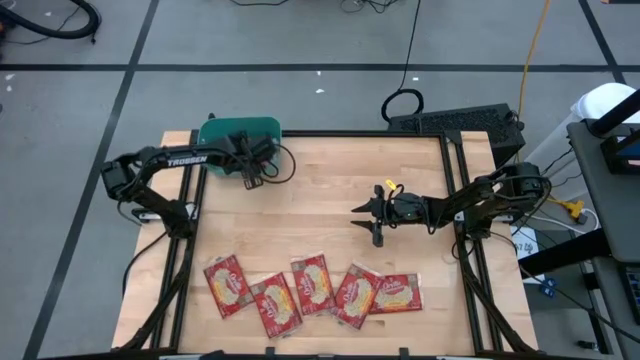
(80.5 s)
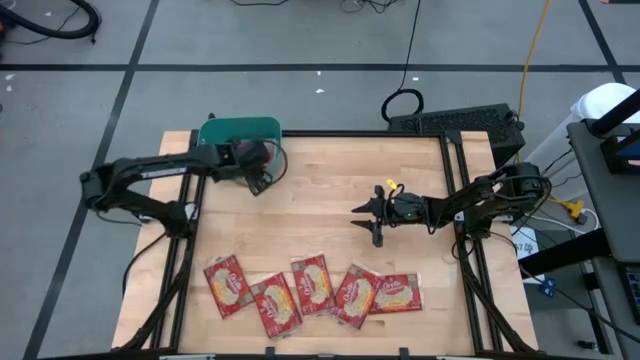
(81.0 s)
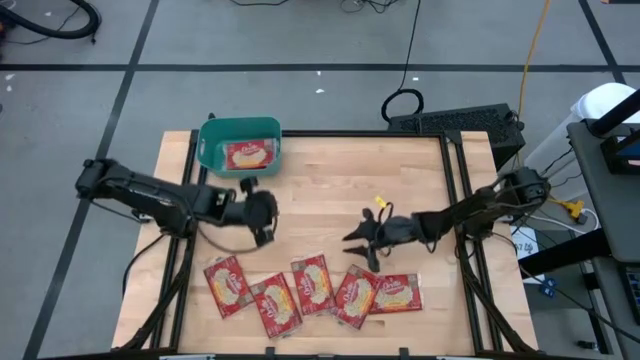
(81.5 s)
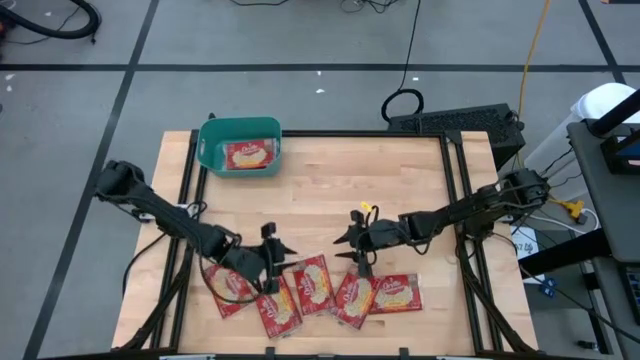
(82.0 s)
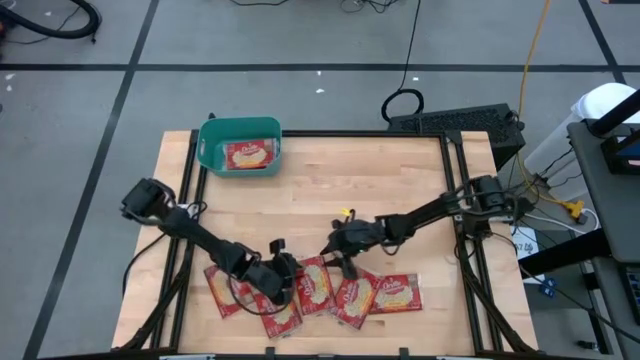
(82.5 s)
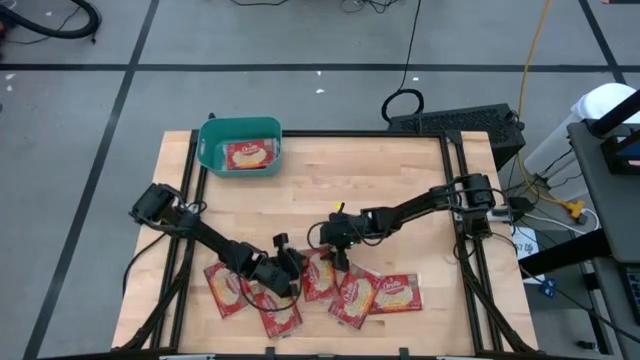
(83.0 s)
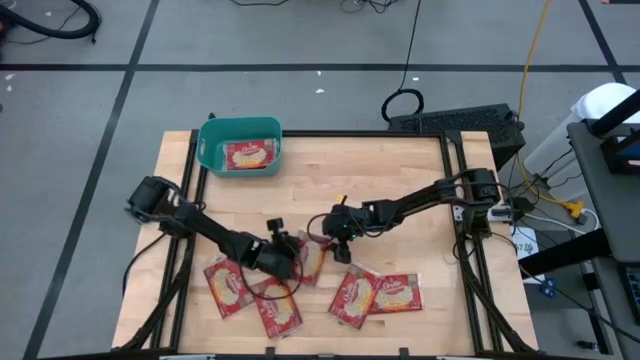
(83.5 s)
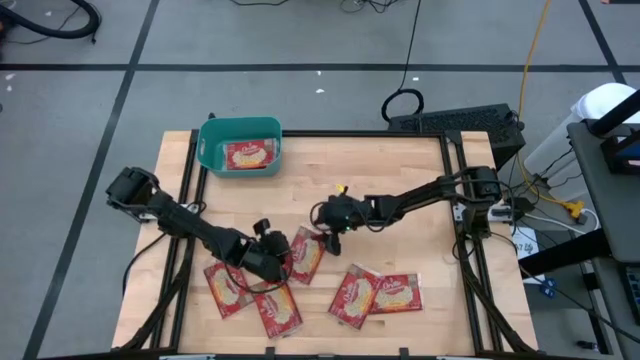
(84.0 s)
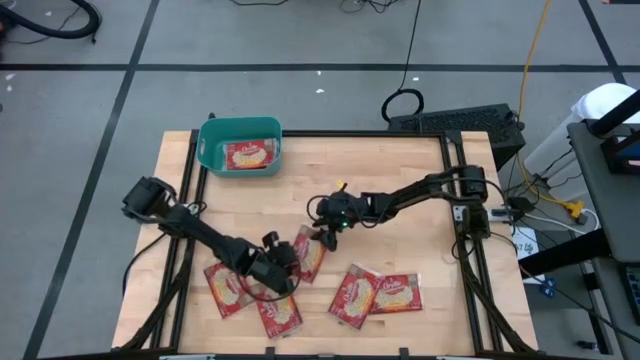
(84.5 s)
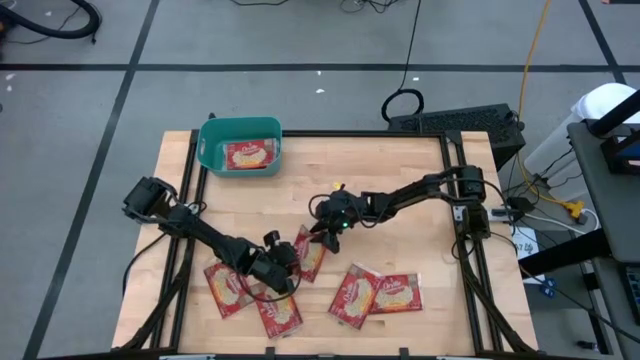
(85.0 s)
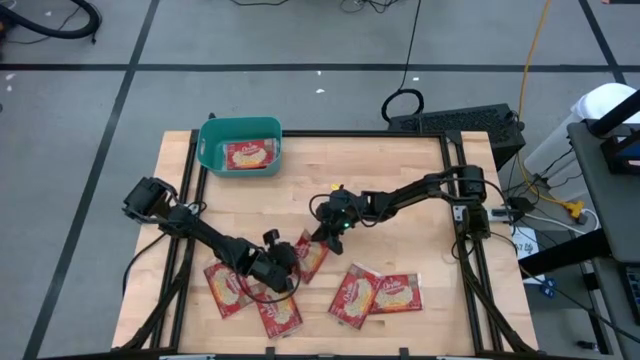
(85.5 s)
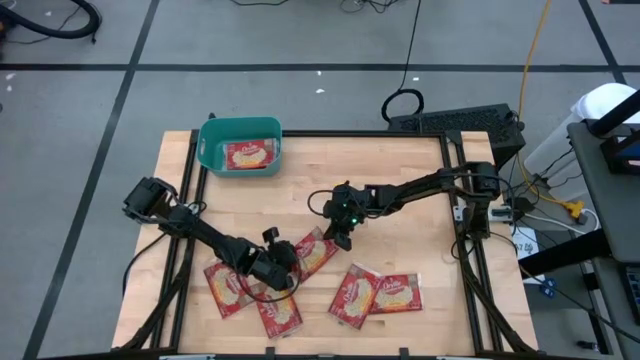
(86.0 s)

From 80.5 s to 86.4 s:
Task: Sort popcorn bags into baskets
Put the red popcorn bag into the green bin

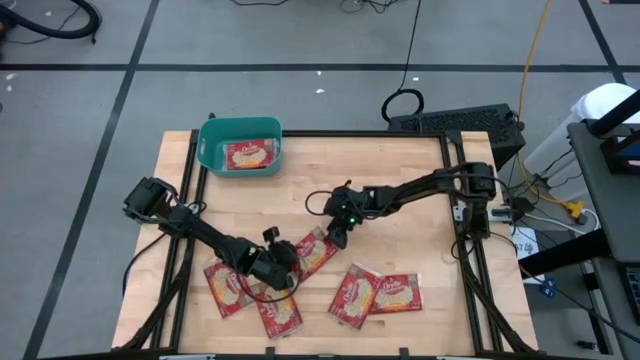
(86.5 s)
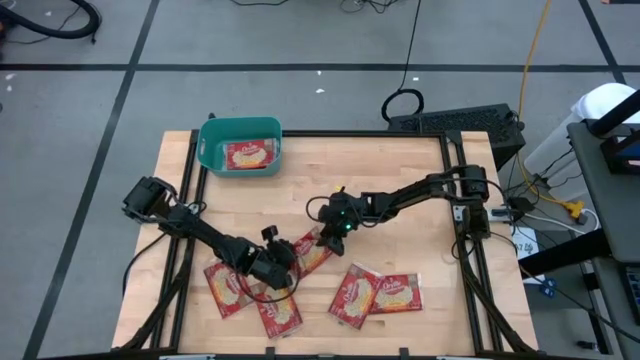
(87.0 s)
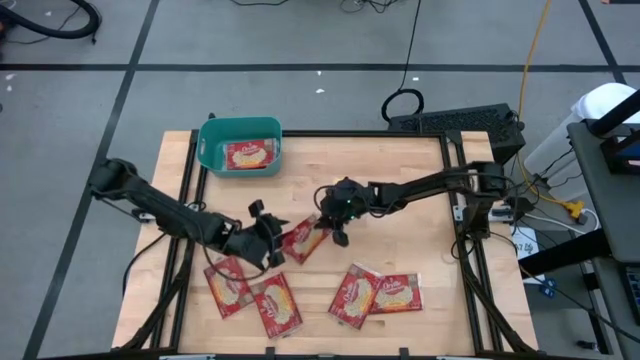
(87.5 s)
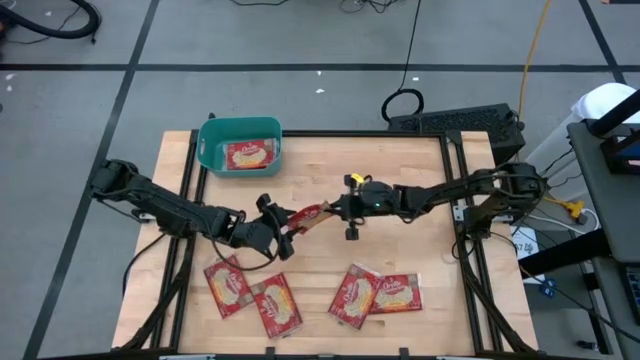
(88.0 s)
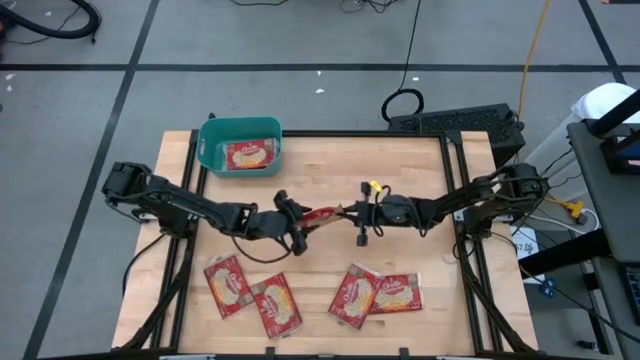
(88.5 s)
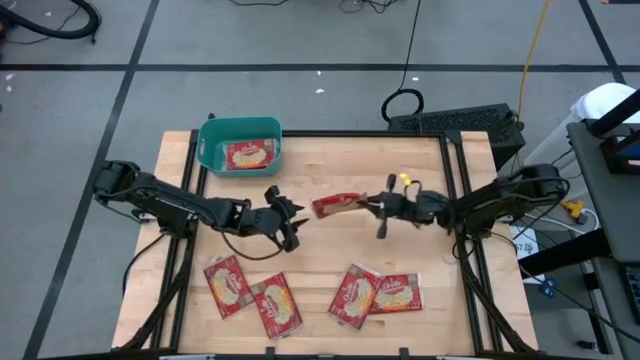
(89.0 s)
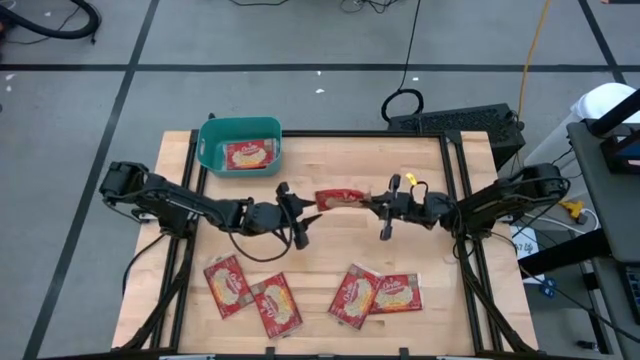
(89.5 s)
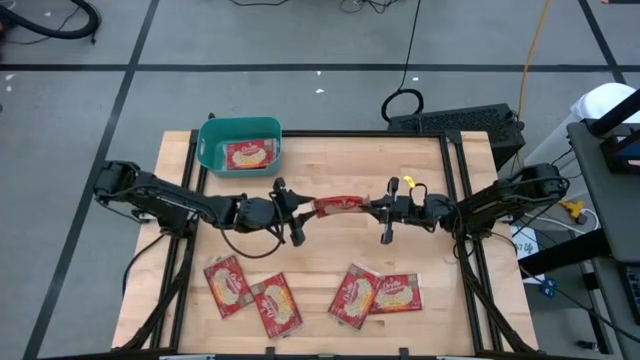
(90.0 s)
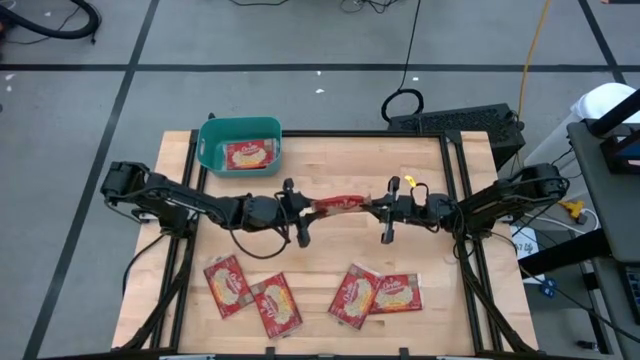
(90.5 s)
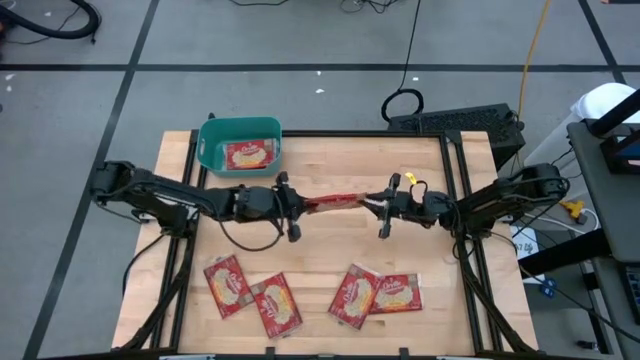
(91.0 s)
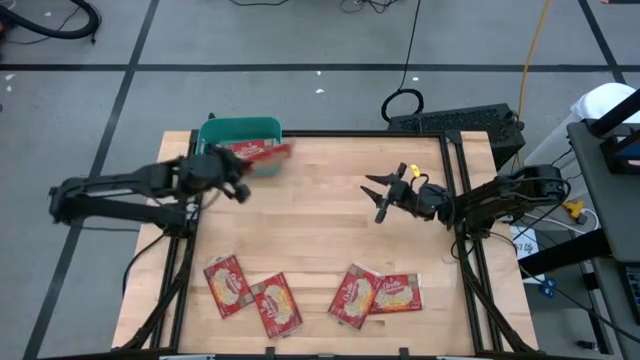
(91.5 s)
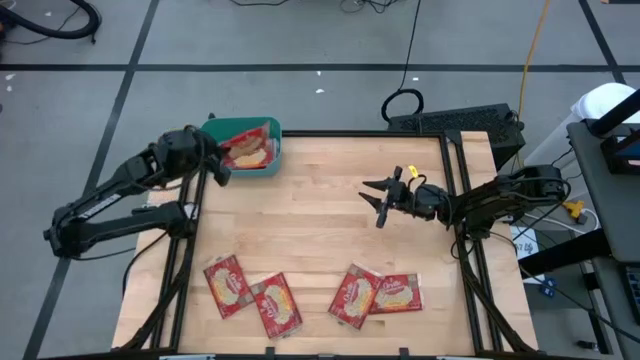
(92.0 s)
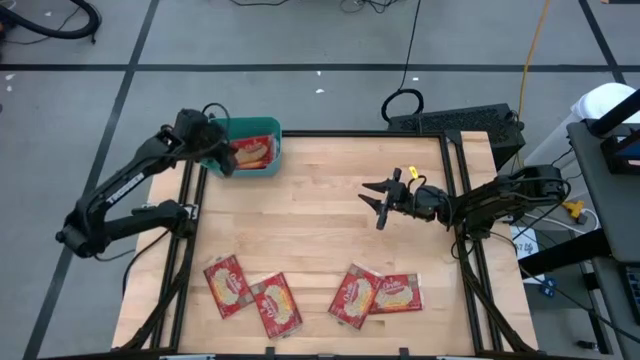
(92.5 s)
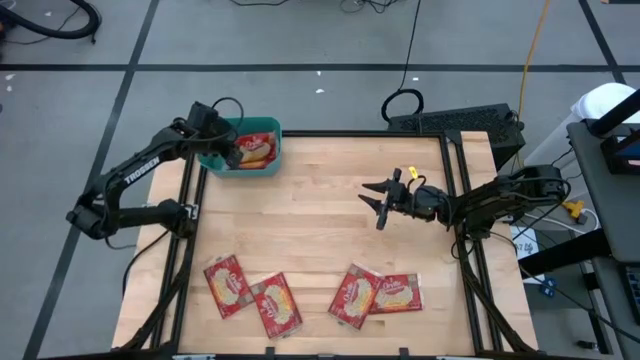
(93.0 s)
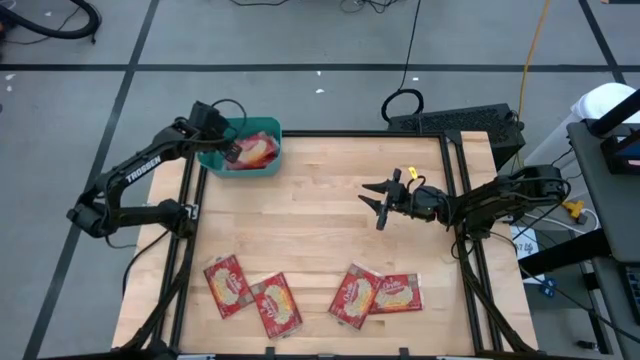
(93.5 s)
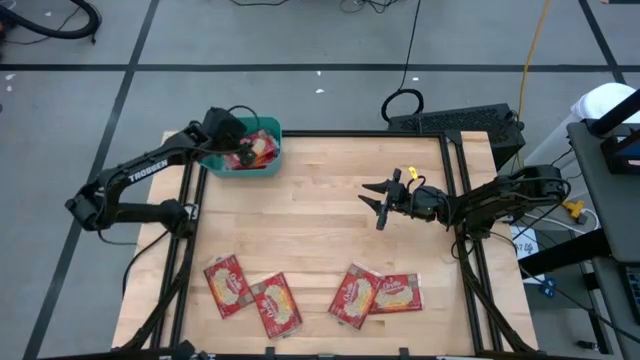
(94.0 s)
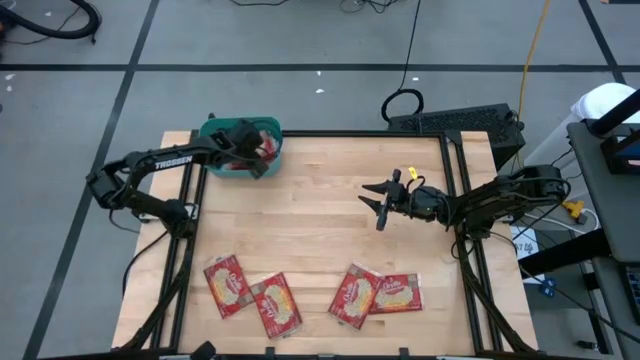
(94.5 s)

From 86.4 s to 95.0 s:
Put the red popcorn bag into the green bin

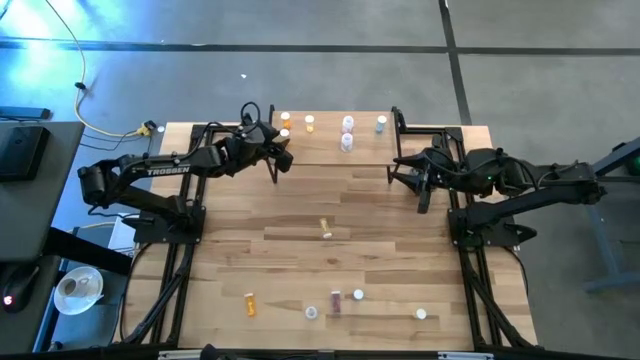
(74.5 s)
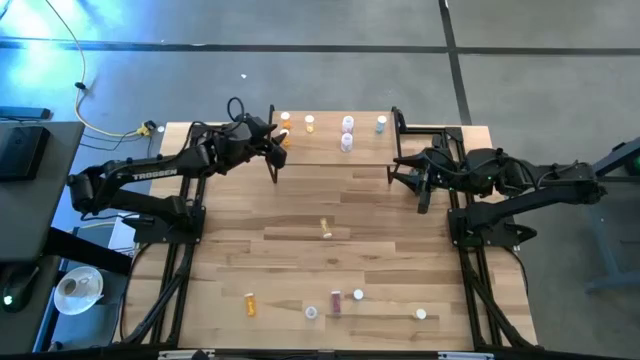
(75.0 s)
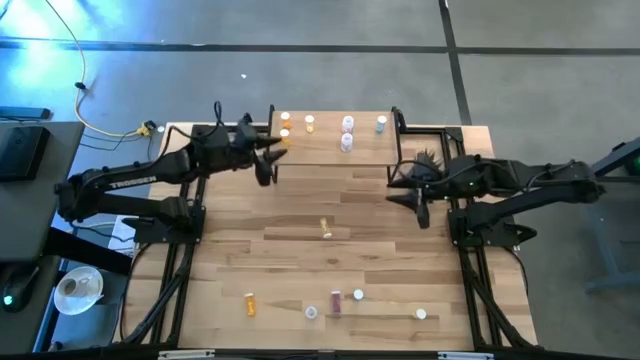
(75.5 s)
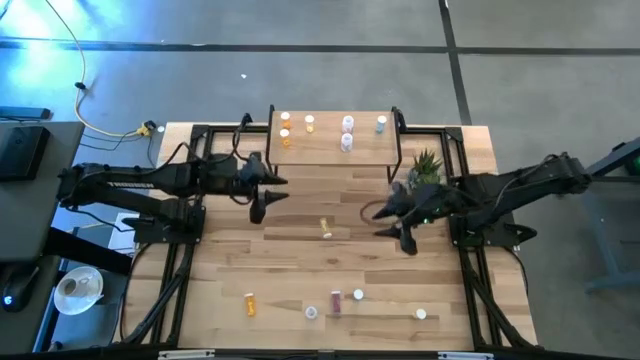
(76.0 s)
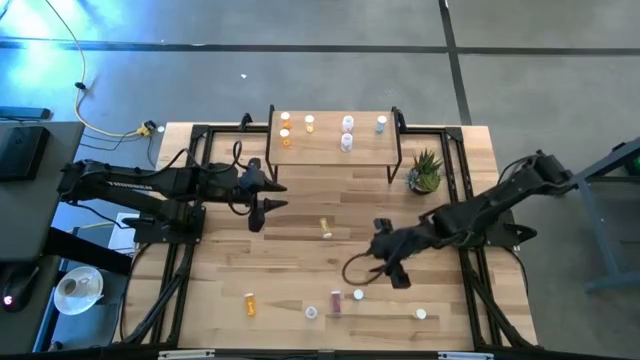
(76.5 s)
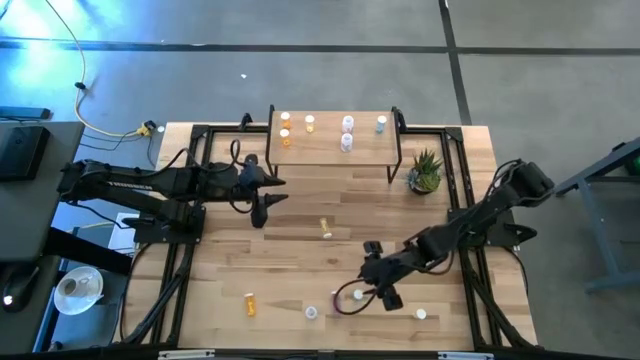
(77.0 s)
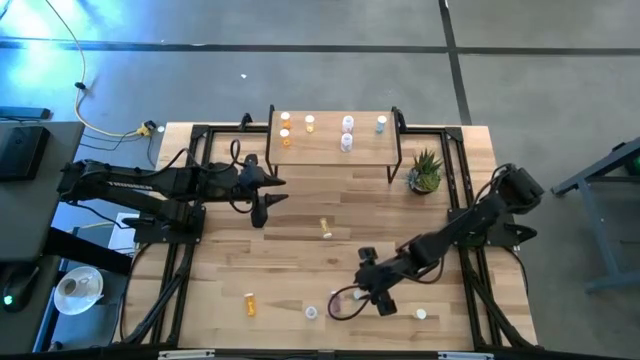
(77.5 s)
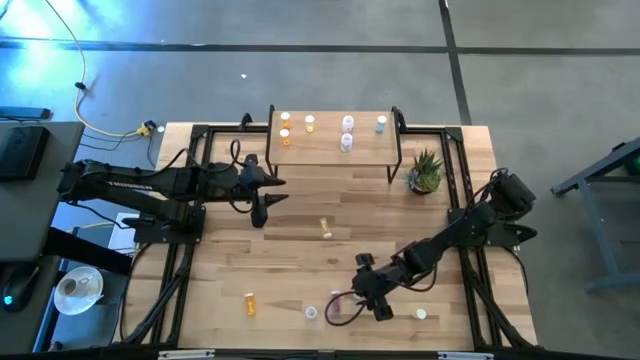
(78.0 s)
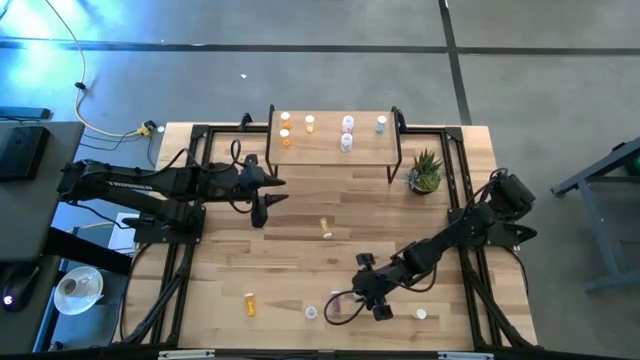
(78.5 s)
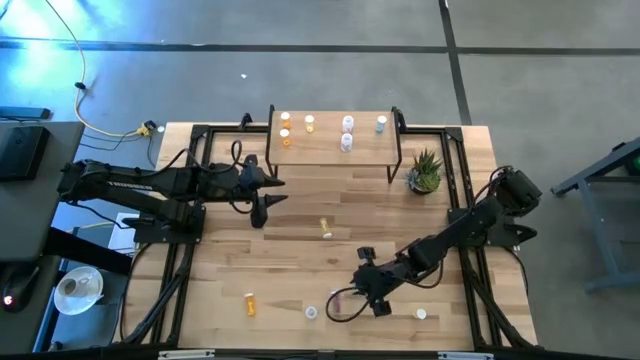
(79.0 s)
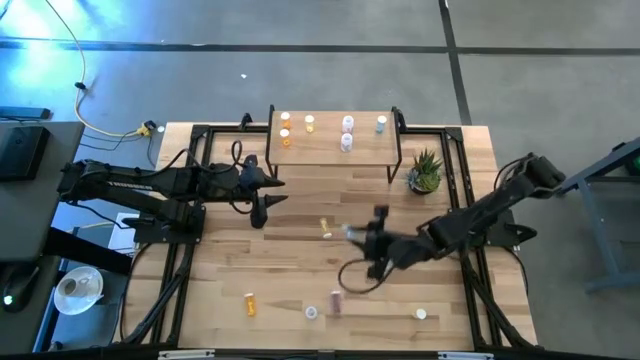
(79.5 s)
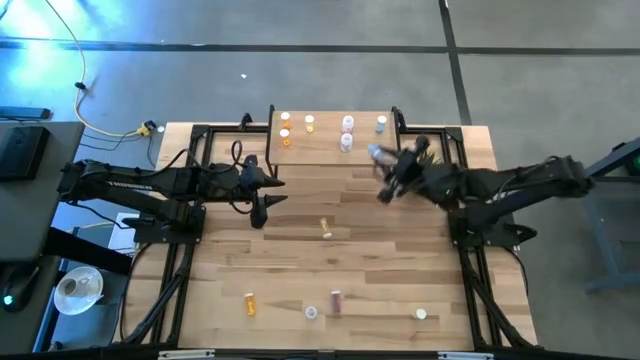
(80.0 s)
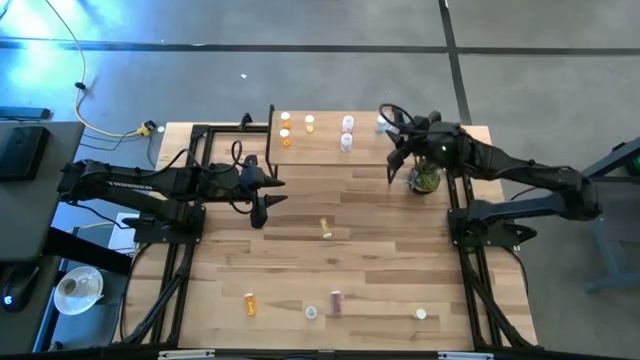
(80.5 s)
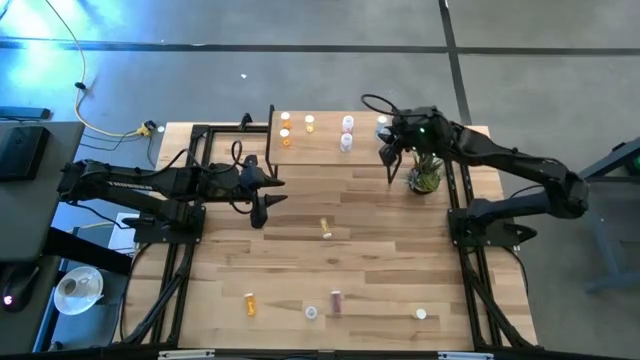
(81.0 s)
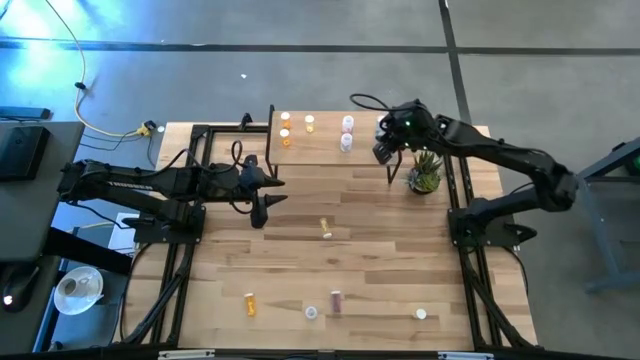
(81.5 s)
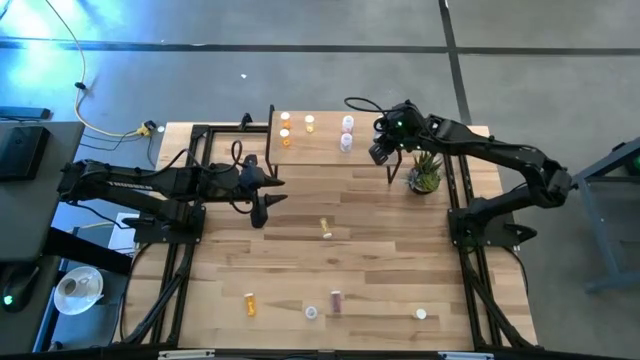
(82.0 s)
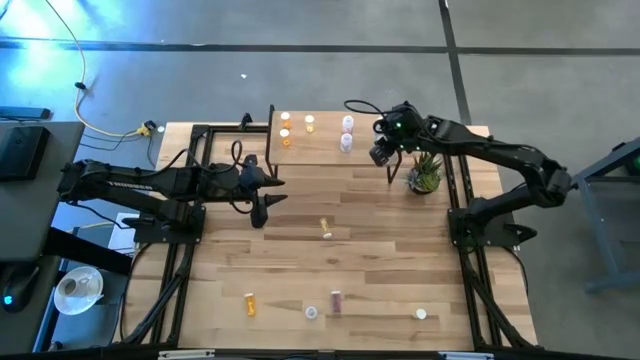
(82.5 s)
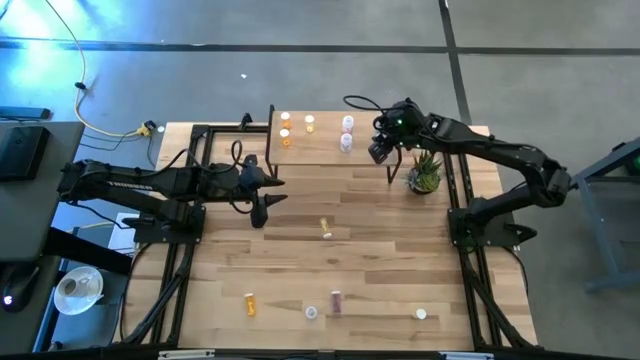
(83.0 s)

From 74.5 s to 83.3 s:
Task: Pick and place medicine bottles onto shelf by color
Put the right blue pill bottle on the shelf aligned with the other blue pill bottle
